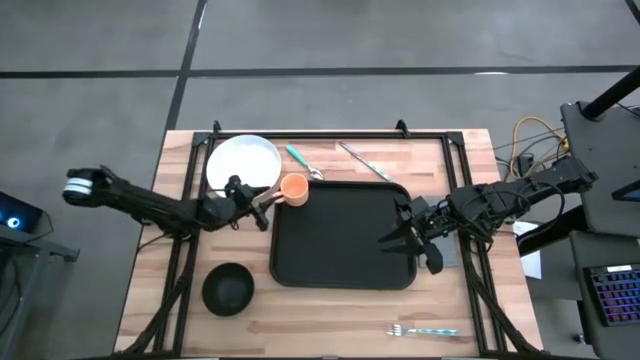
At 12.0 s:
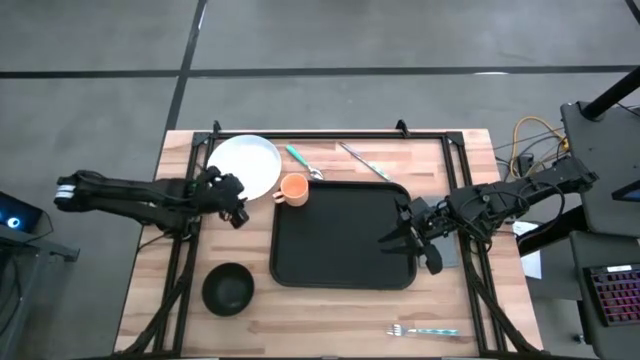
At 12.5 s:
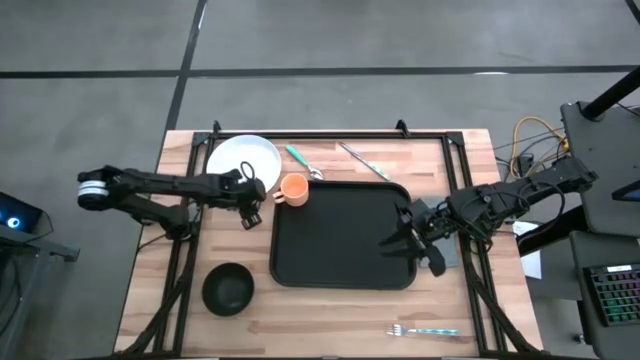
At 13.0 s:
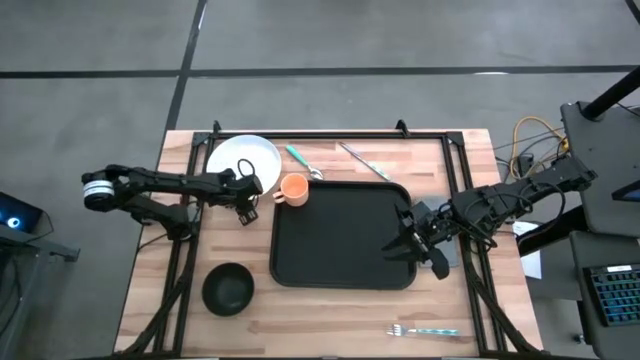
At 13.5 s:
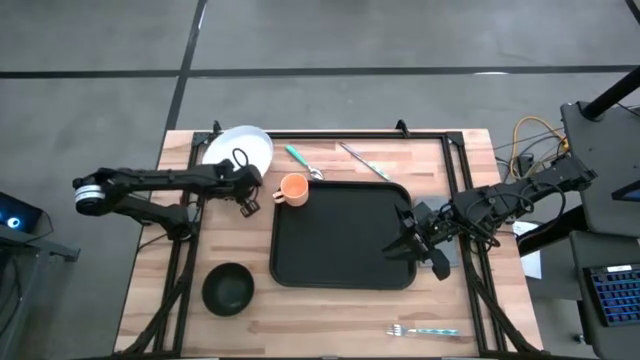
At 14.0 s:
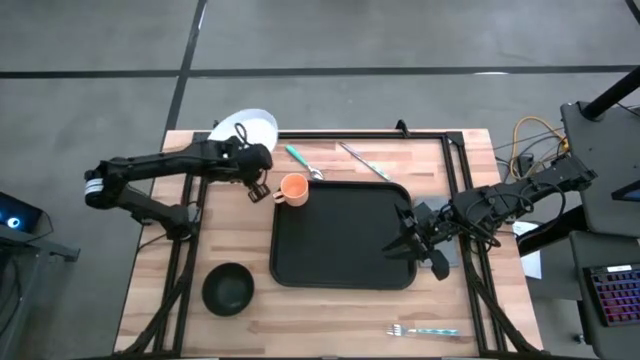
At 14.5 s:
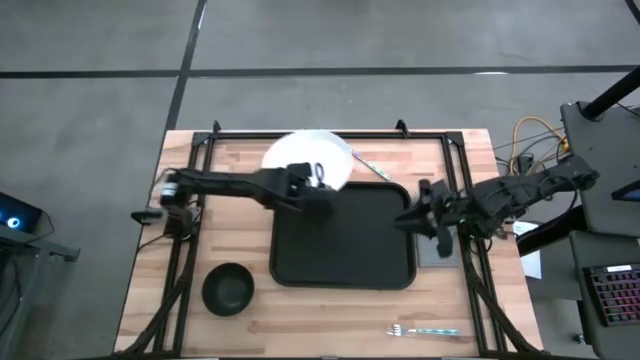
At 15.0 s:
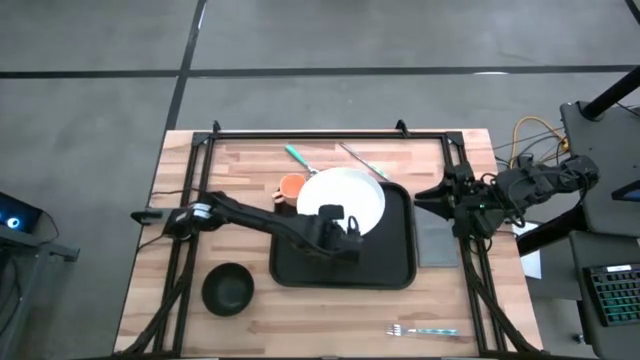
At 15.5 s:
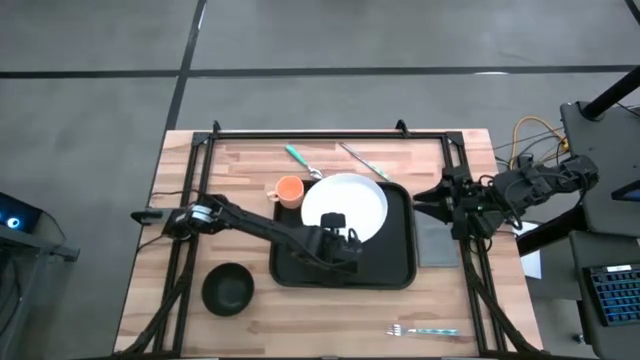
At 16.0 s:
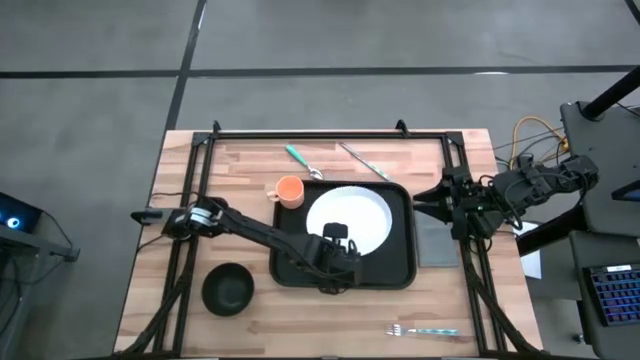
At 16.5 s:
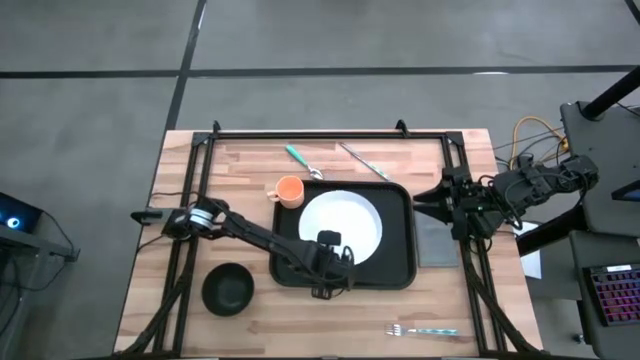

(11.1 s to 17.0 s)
Task: Set up tray
Put the white plate on the black serving tray to the bottom right of the orange mug

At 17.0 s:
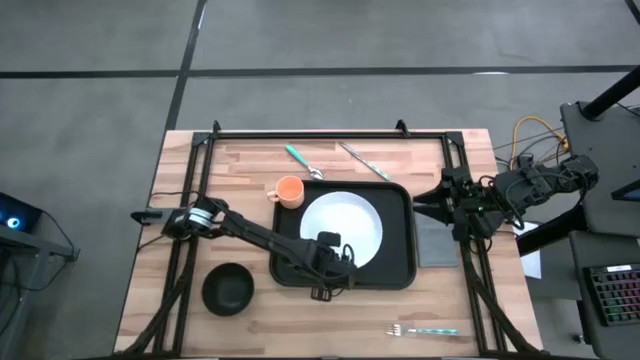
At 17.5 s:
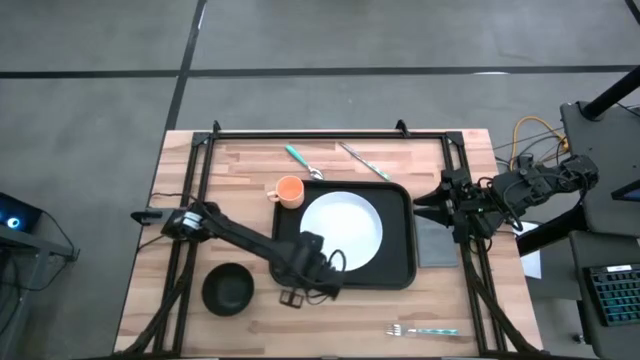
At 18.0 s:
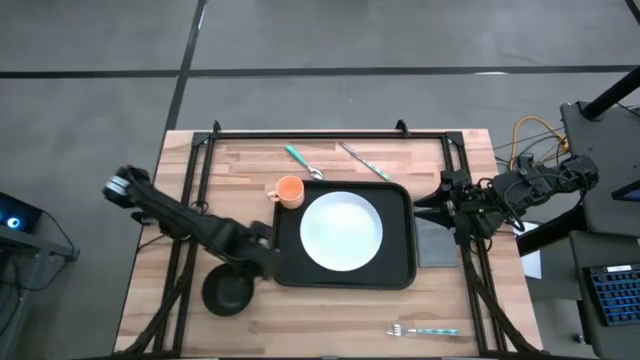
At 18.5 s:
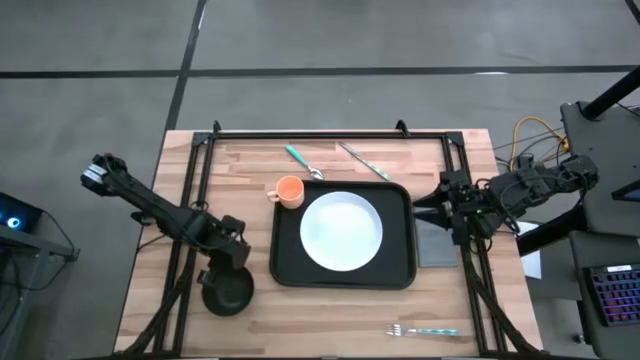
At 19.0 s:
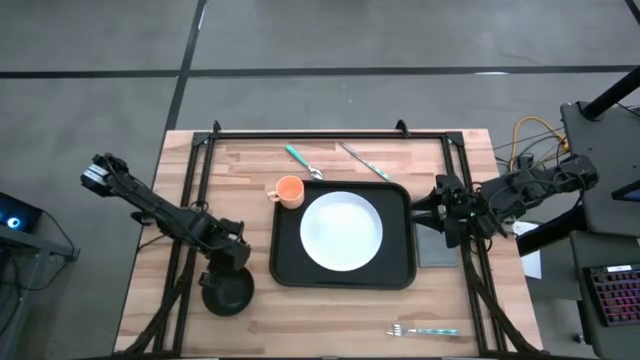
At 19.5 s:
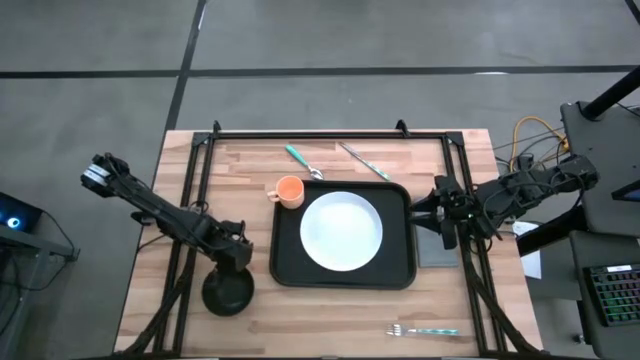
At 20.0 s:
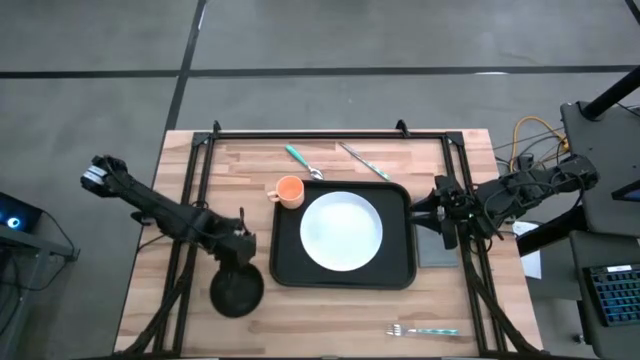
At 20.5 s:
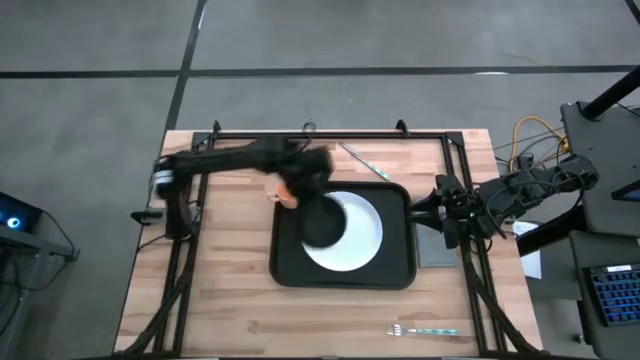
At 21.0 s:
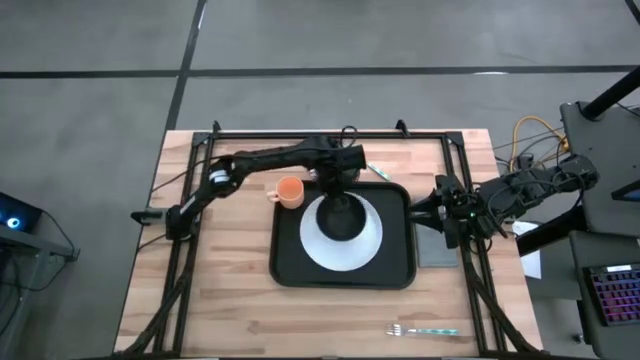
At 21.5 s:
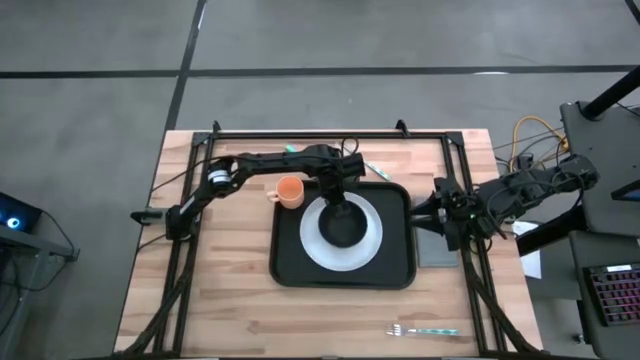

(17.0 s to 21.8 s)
Put the black bowl on top of the white plate

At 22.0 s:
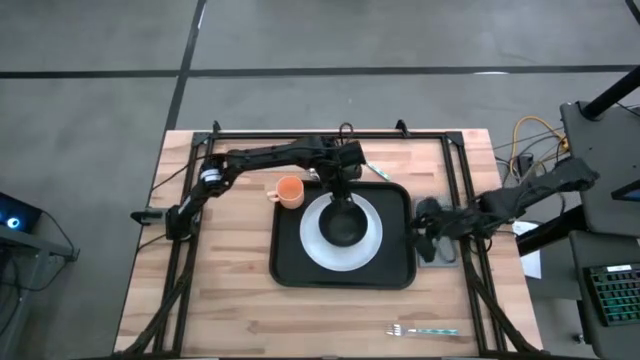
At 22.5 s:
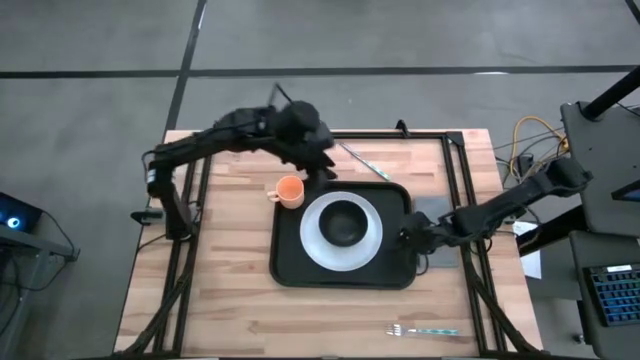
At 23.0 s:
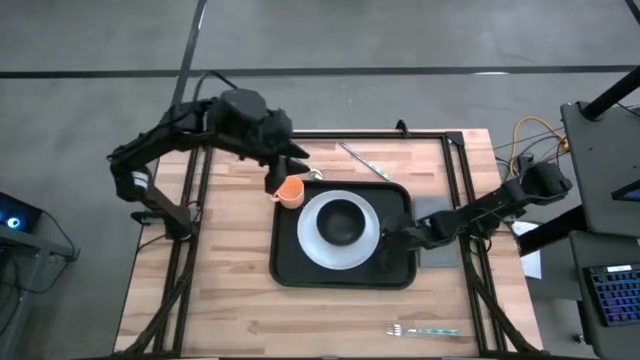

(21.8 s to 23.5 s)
Adjust the white plate

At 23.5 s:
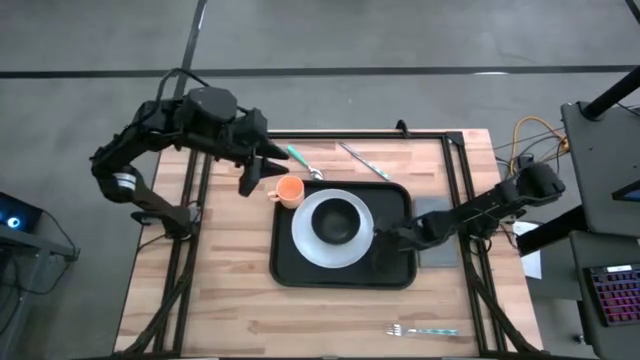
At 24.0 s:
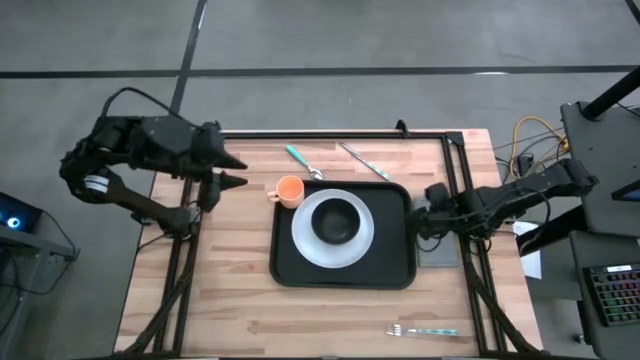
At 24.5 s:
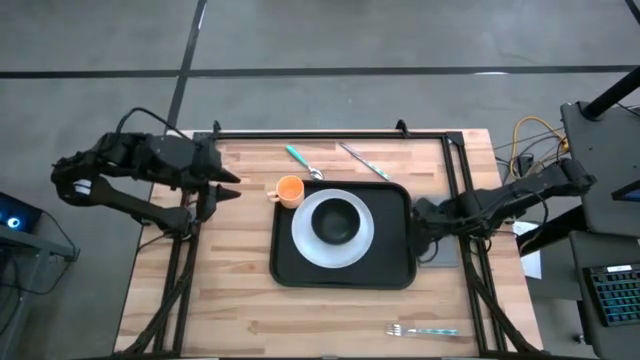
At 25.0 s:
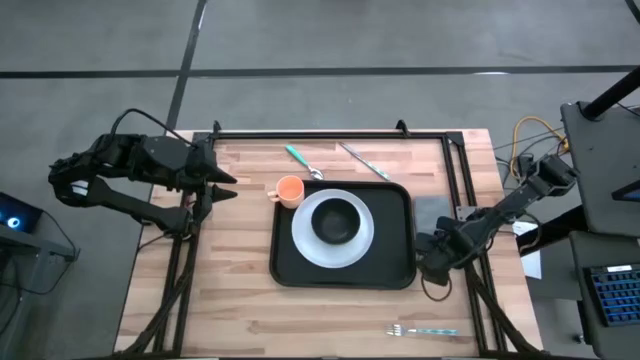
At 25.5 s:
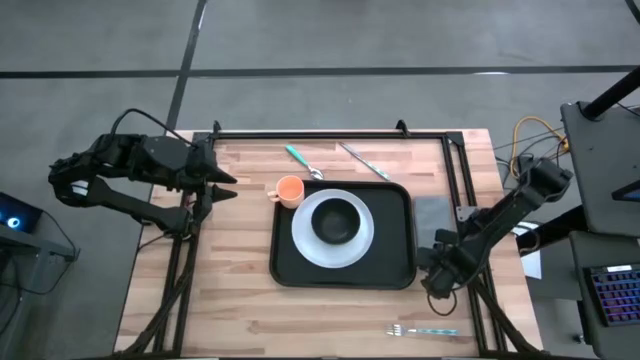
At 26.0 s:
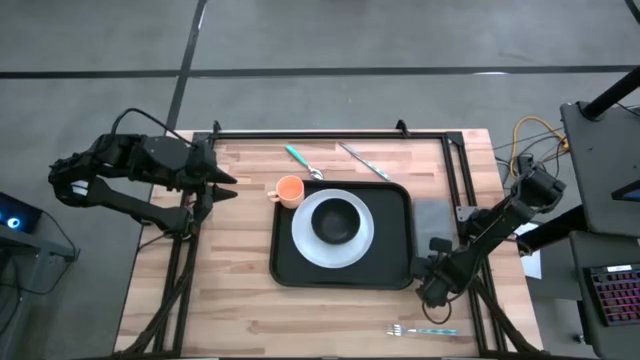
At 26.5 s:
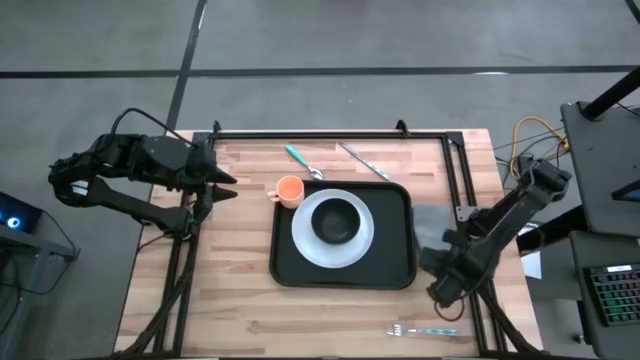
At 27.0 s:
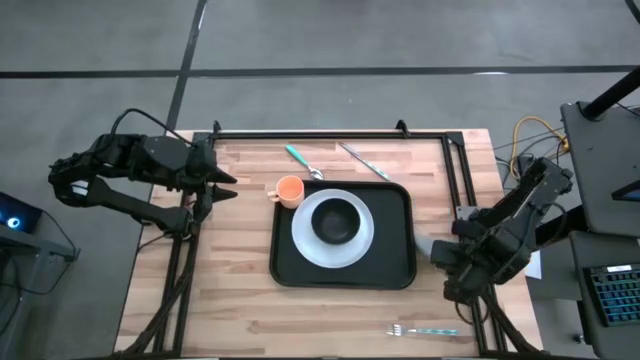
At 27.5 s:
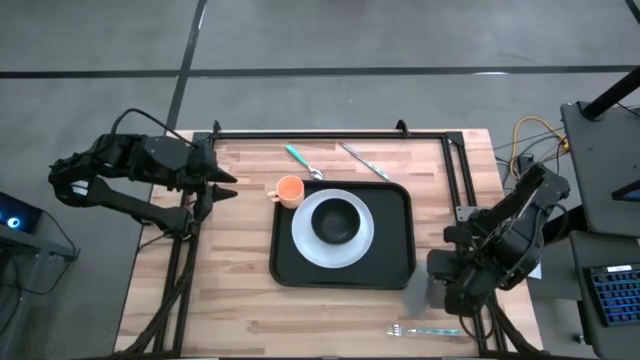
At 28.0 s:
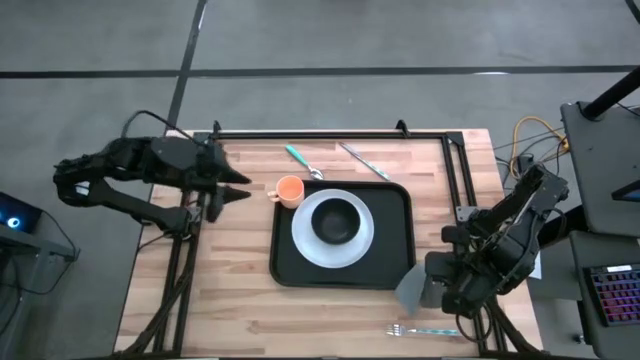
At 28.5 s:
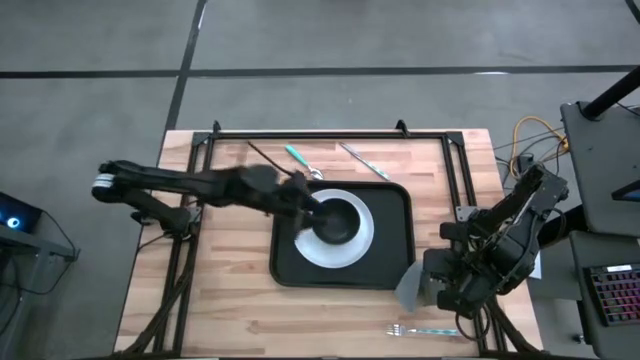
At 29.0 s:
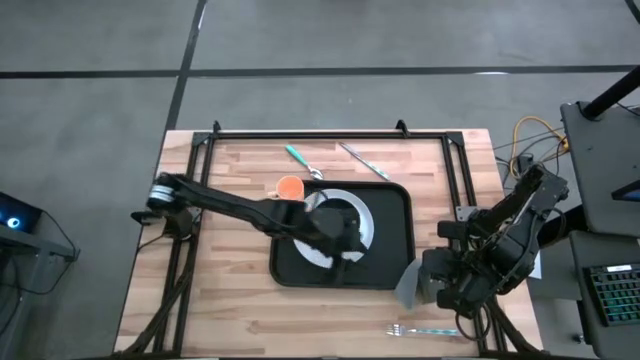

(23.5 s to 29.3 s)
Put the gray napkin on the black serving tray to the right of the white plate

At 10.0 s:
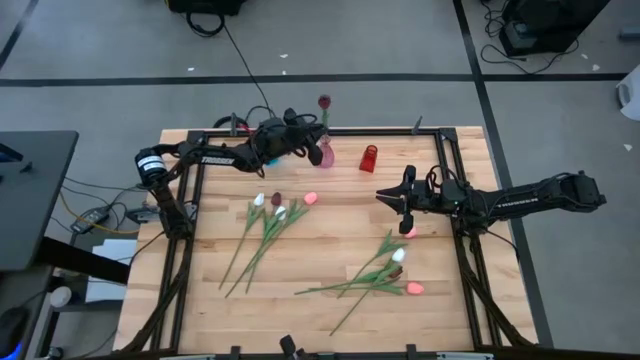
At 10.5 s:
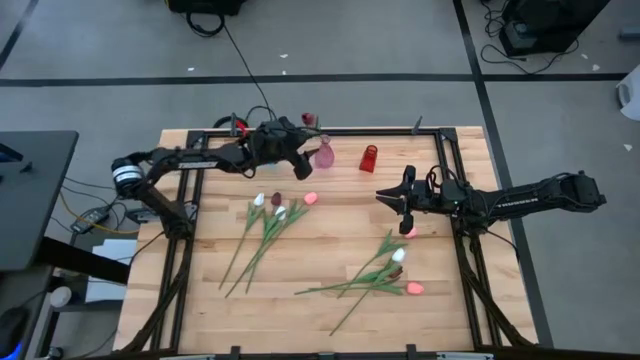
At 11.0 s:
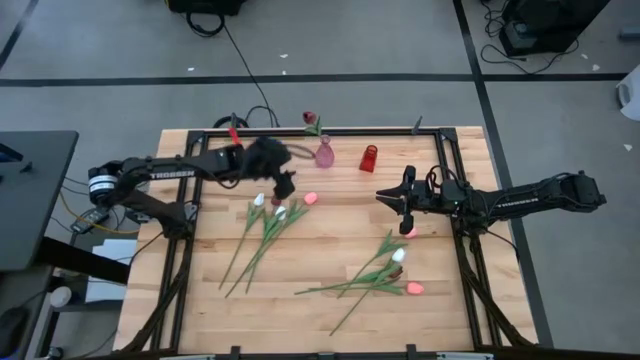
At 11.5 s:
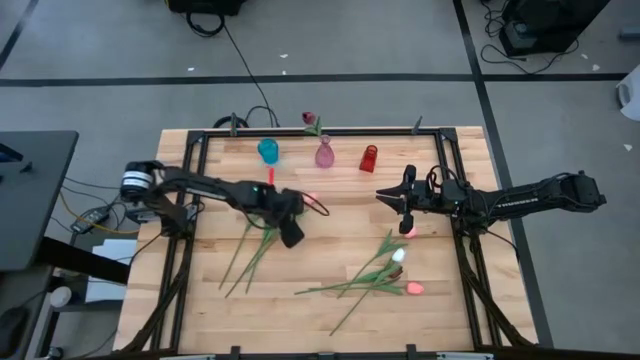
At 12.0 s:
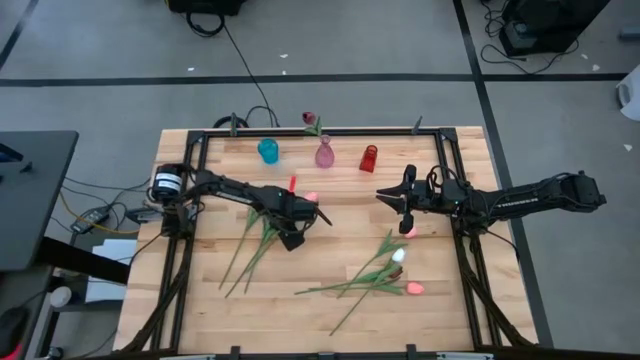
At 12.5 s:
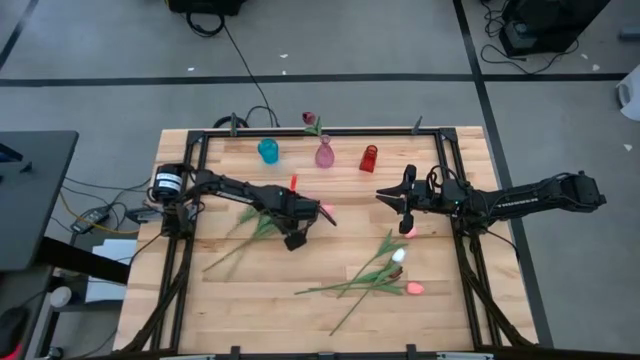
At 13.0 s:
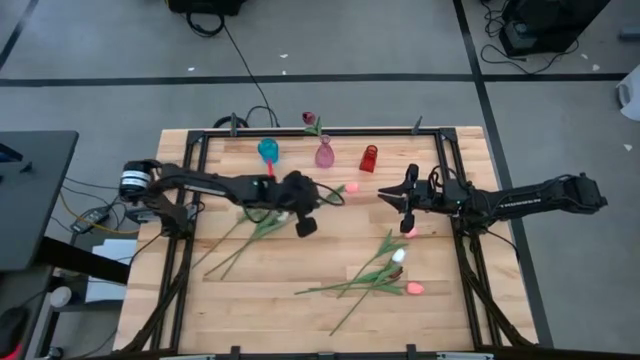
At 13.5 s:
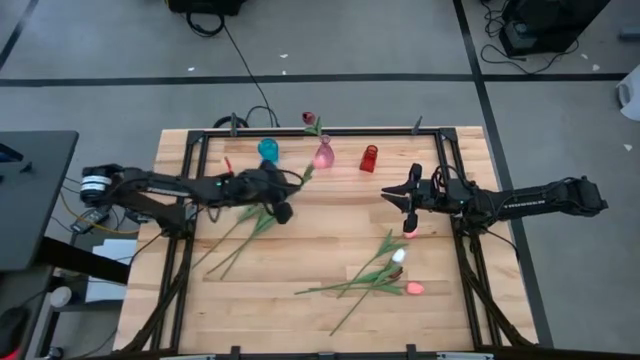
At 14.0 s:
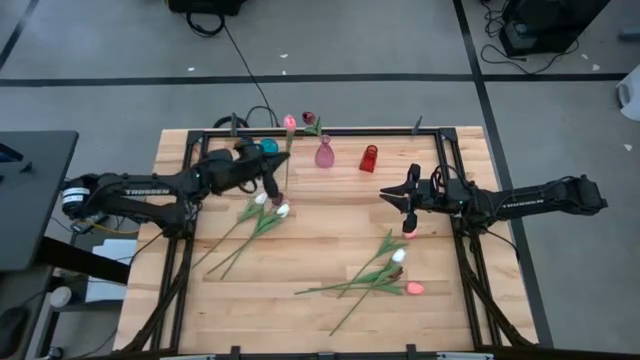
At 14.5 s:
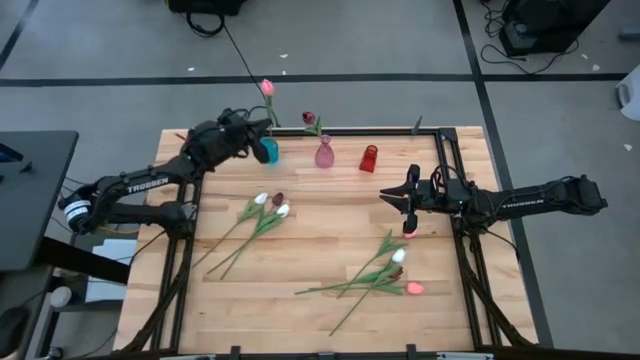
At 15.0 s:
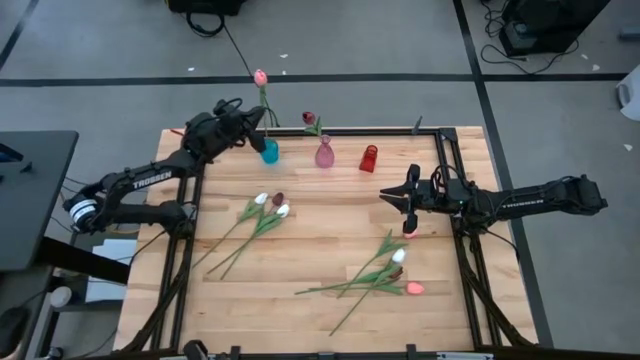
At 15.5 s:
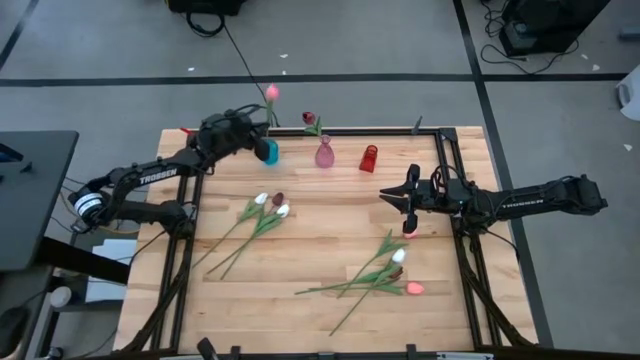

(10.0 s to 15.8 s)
Task: Sort flowers into vase by color
Put the top left pink flower into the blue vase
